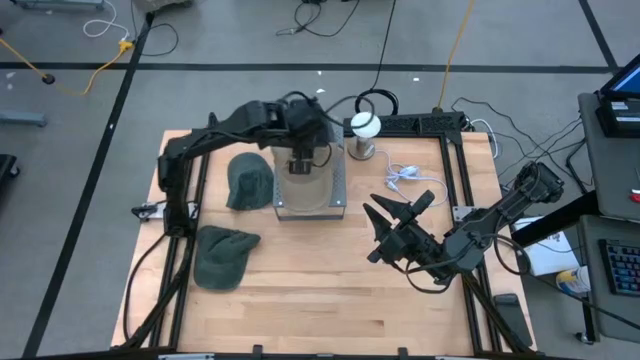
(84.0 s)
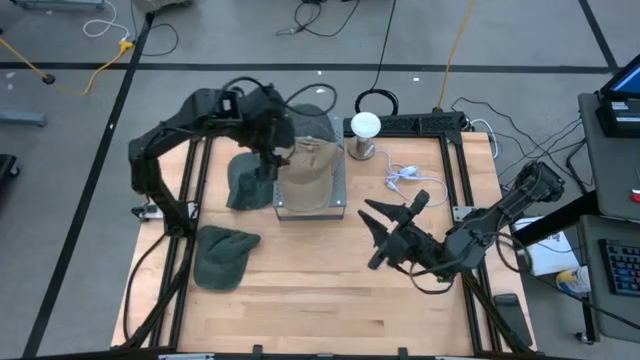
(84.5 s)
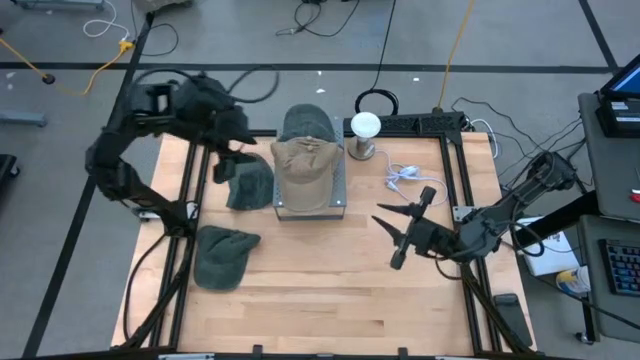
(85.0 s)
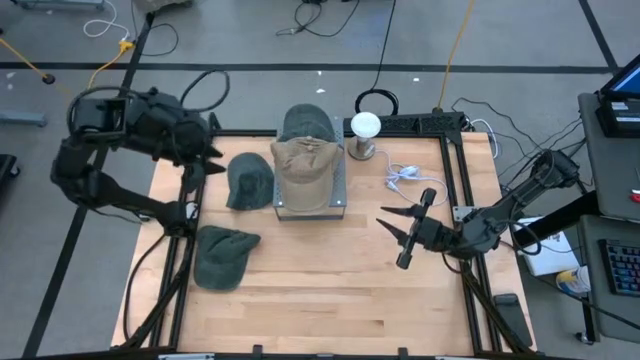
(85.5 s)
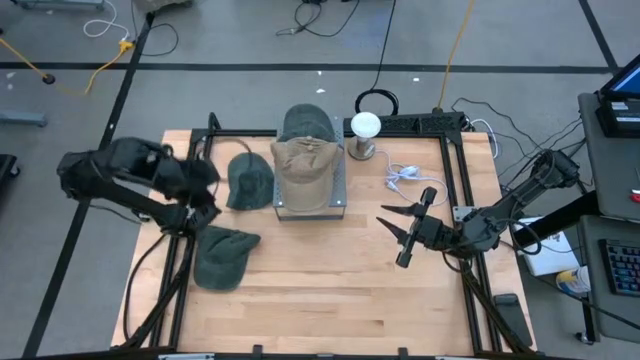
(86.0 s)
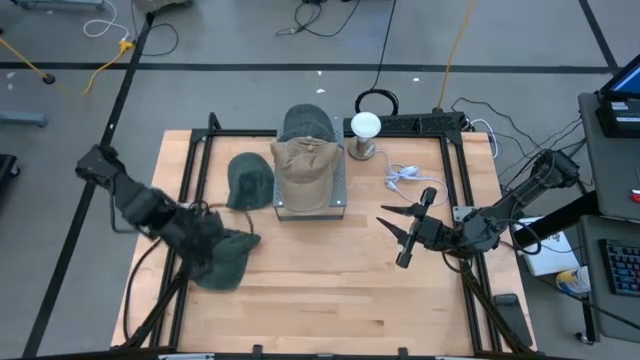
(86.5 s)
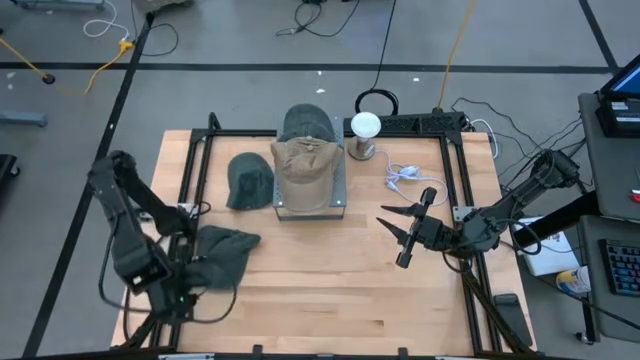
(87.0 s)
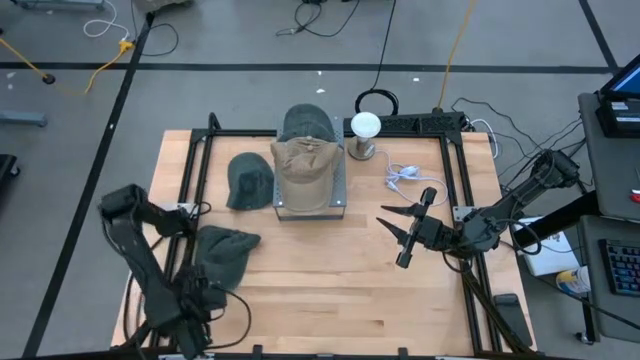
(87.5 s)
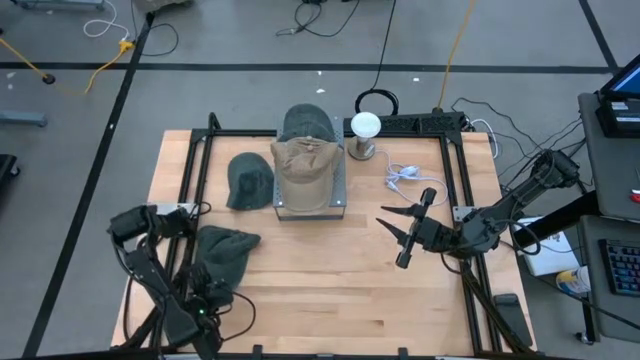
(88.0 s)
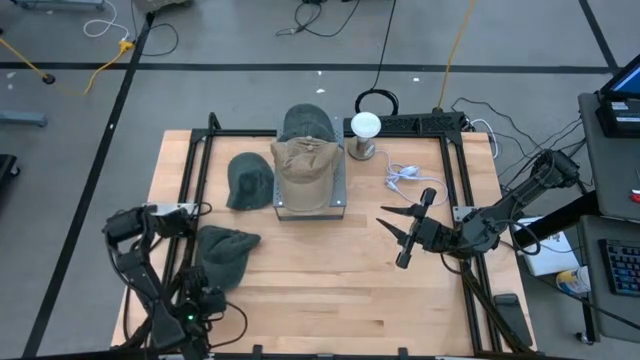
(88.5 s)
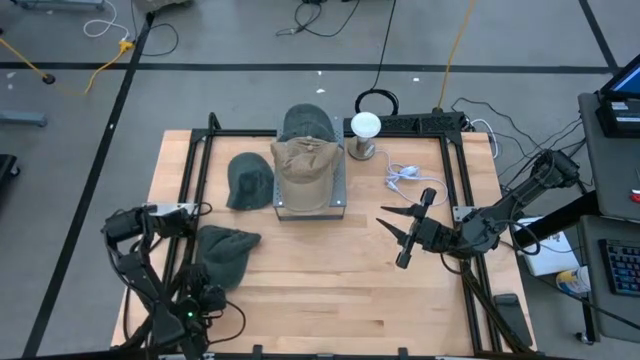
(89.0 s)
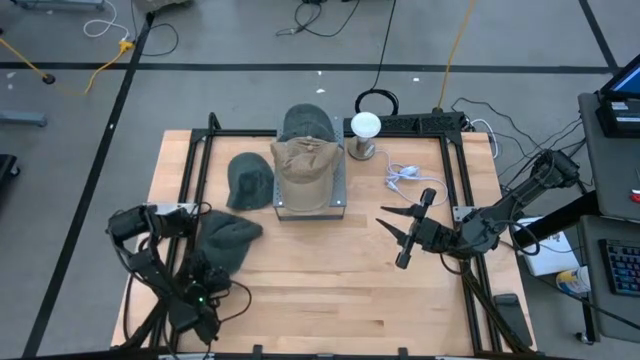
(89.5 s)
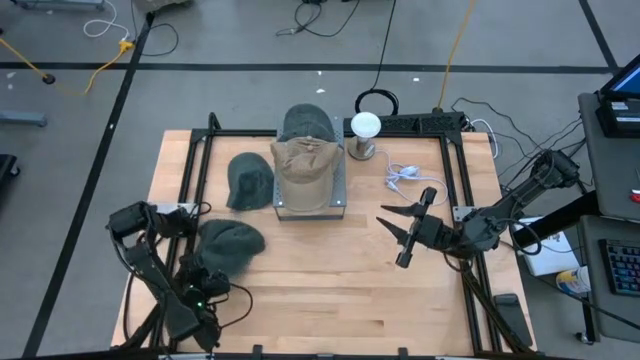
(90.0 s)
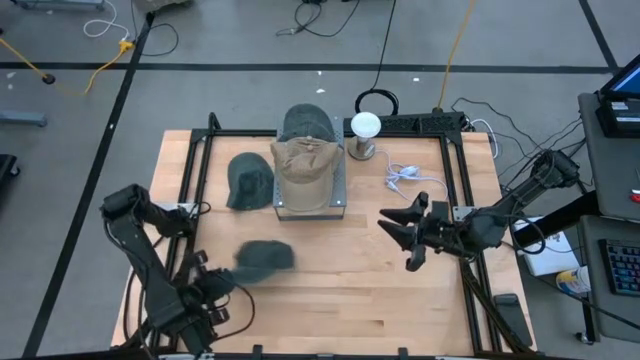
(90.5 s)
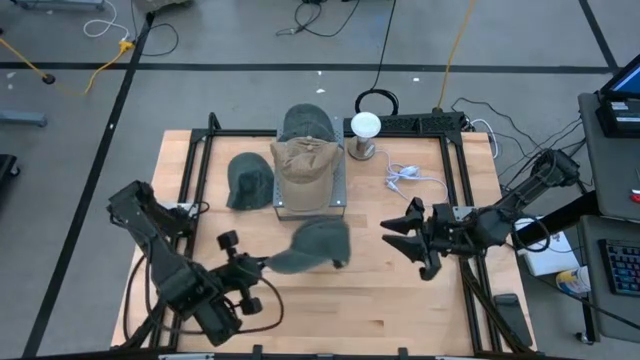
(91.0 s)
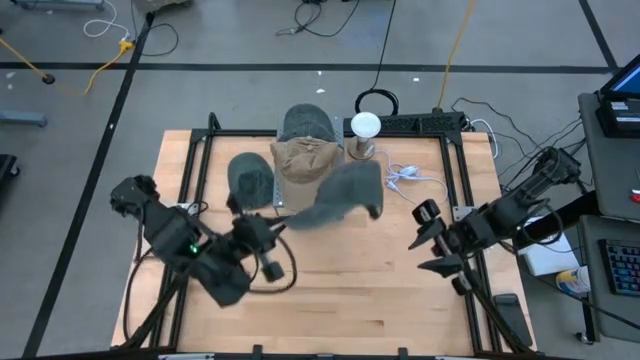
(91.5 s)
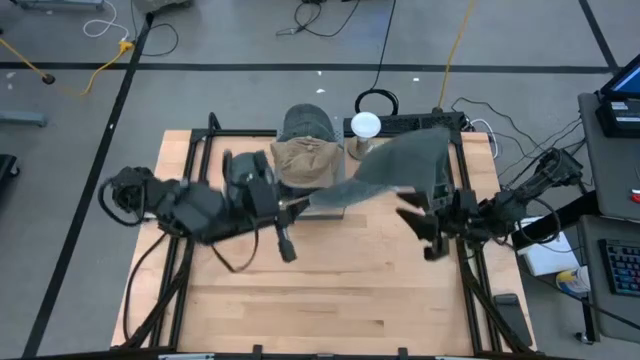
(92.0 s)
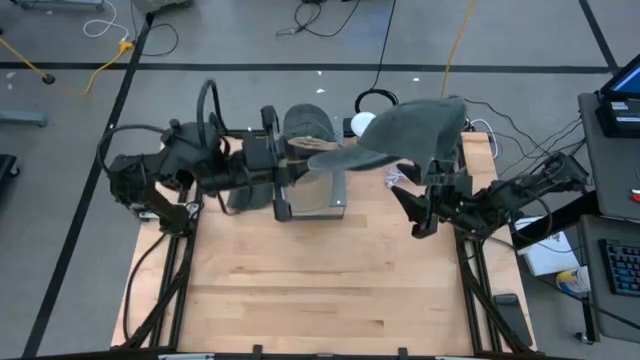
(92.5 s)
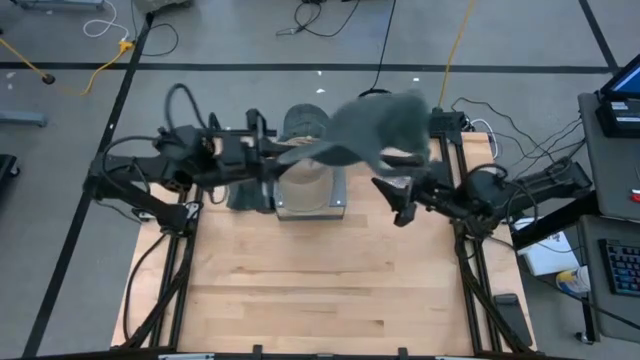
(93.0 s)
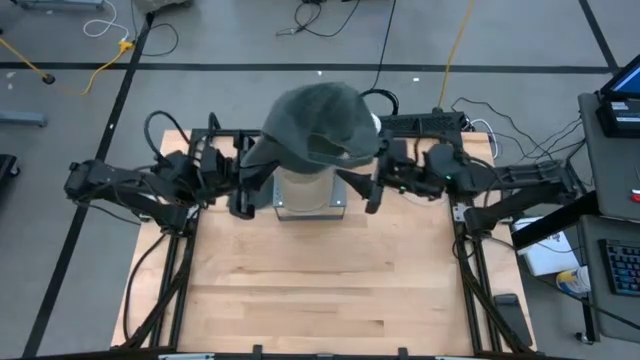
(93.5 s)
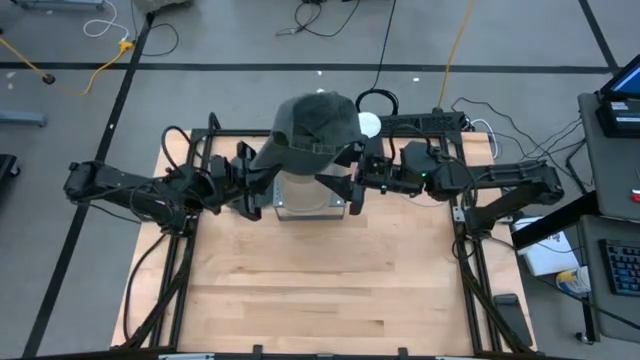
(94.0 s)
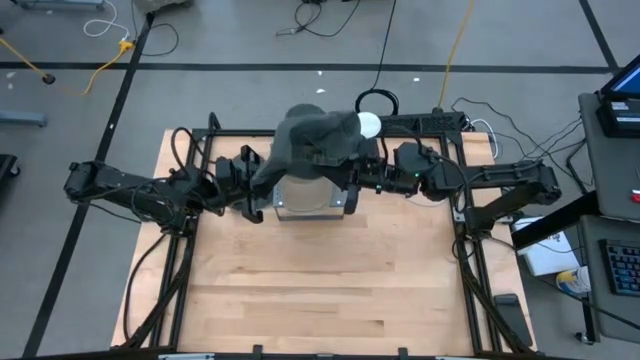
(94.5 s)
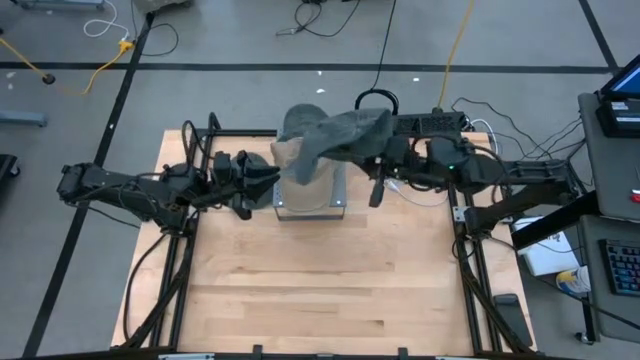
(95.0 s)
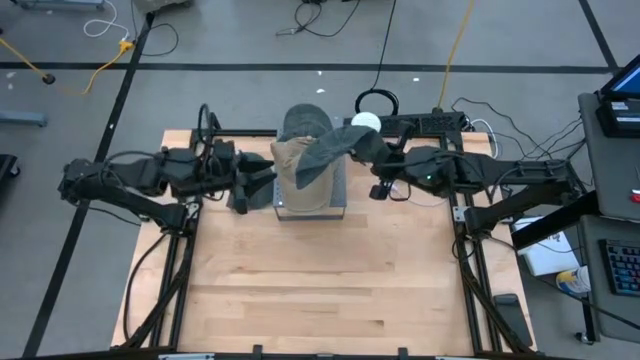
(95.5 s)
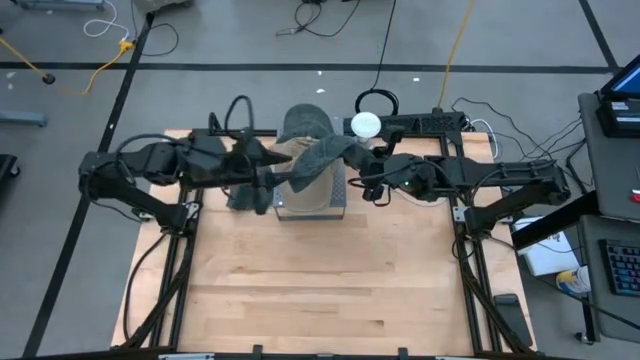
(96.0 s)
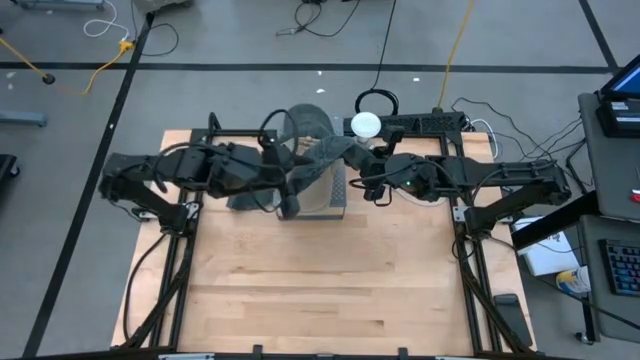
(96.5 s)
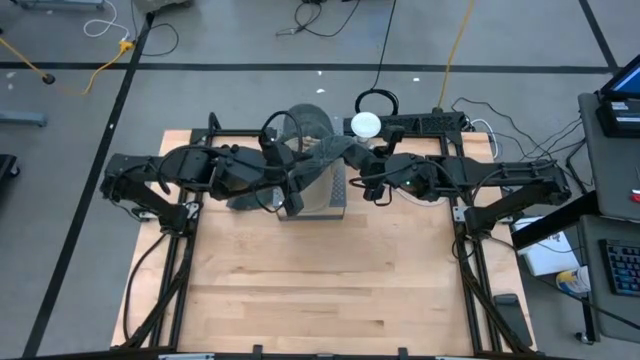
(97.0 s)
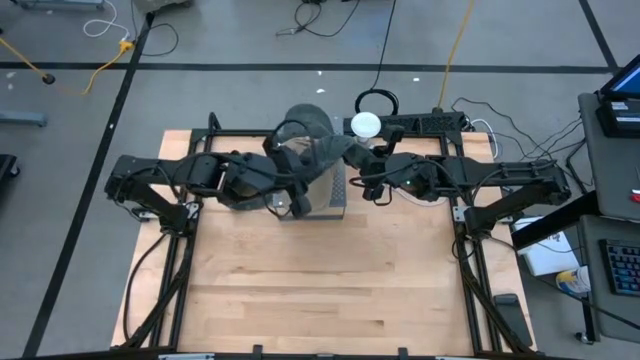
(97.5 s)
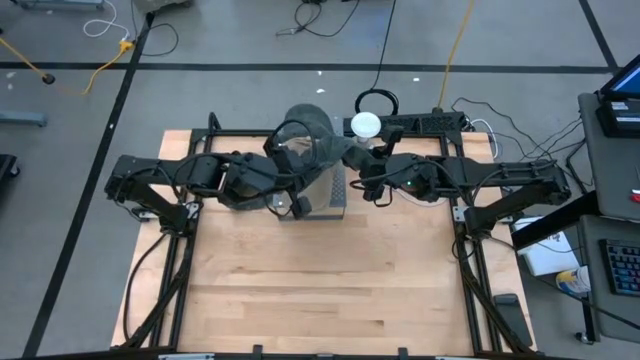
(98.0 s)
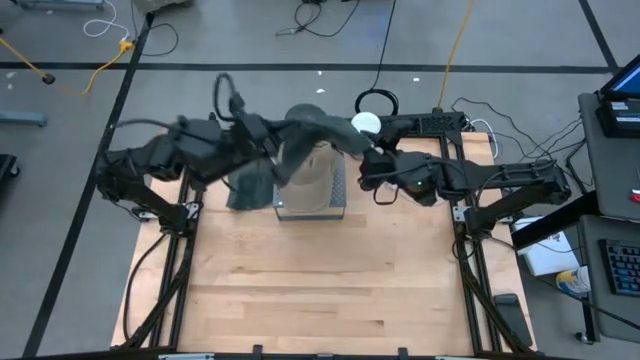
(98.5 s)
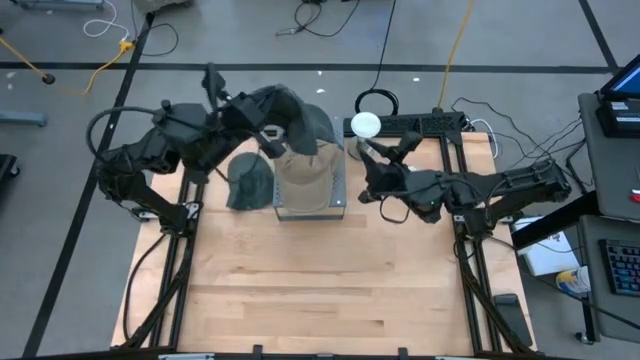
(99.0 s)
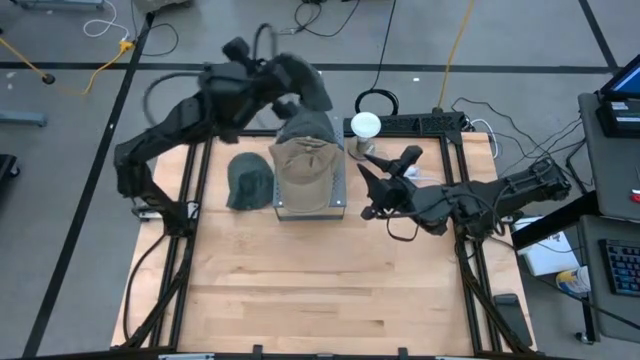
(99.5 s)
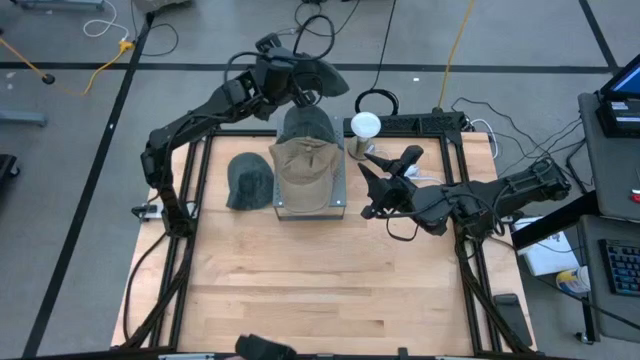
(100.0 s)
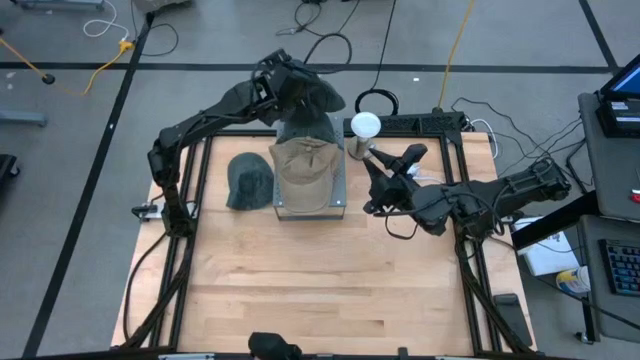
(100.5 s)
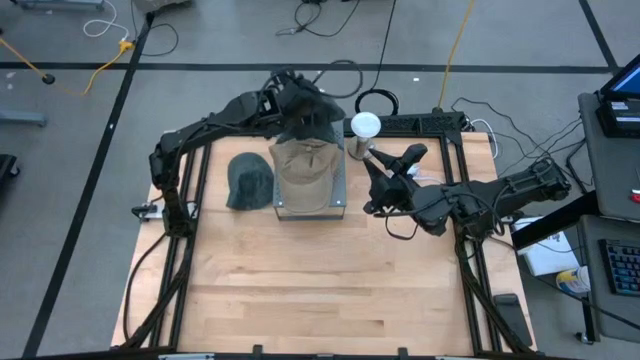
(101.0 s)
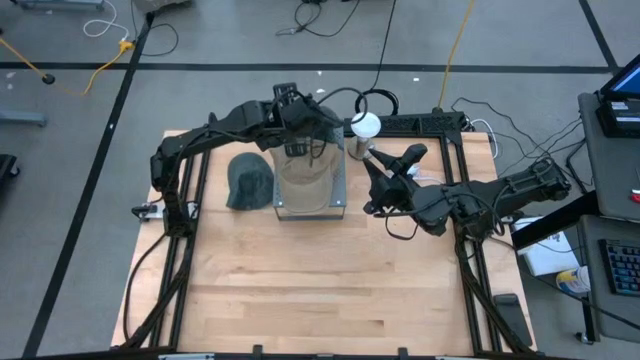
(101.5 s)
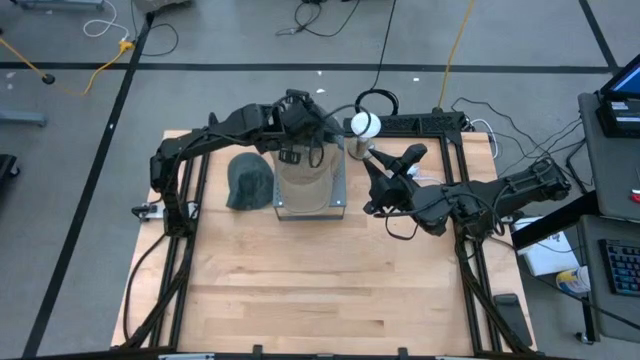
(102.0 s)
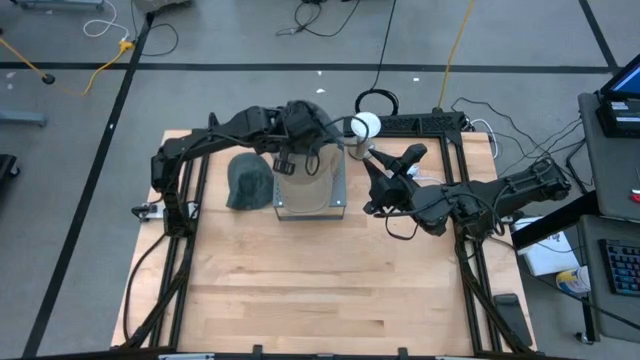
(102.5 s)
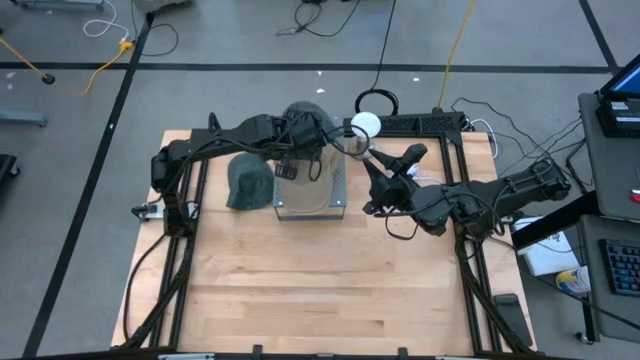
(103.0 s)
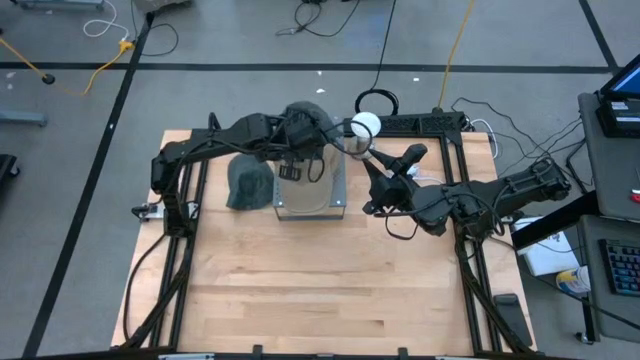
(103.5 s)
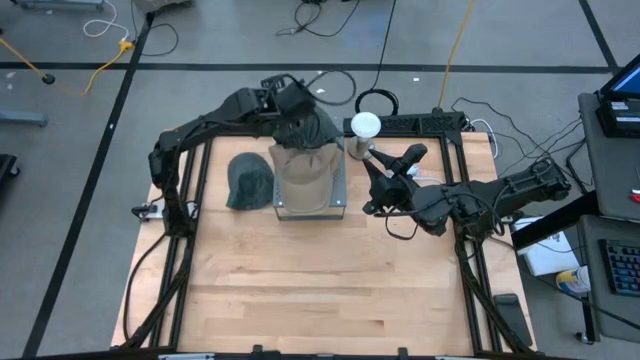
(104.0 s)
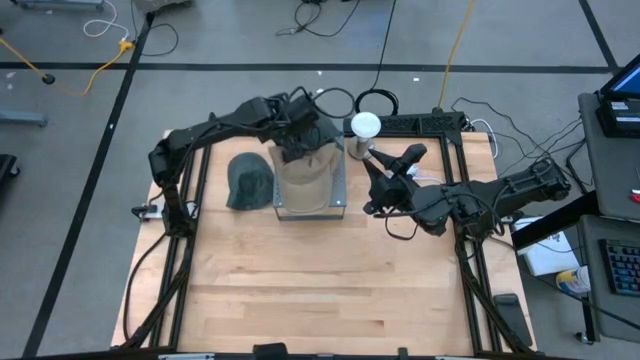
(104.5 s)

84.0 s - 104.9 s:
Task: Pick & Place hat
Stack the bottom black cap on the black cap on the shelf

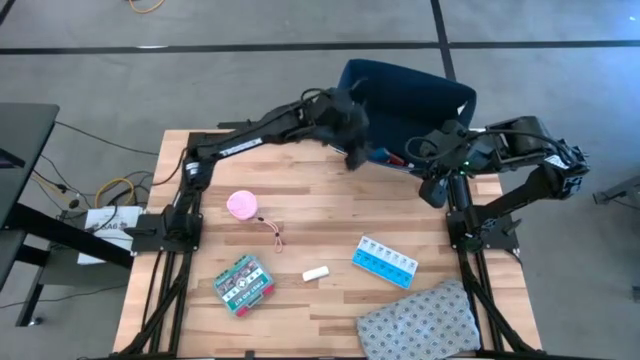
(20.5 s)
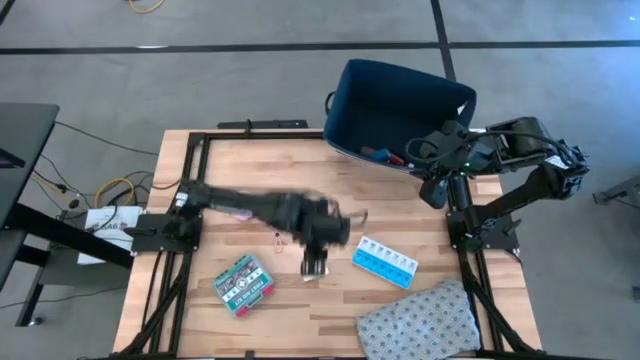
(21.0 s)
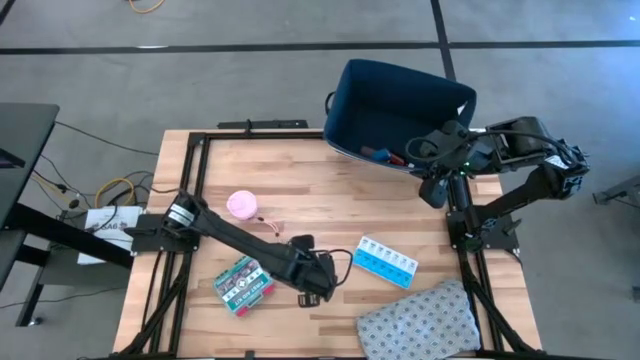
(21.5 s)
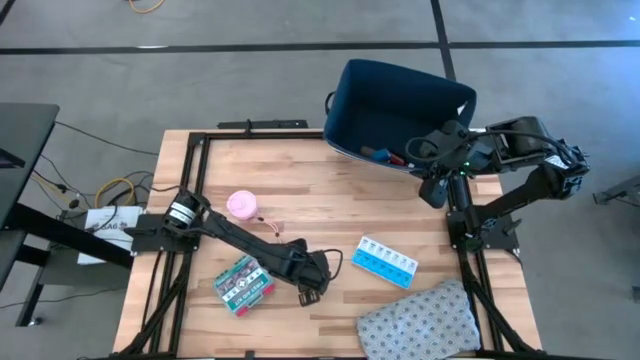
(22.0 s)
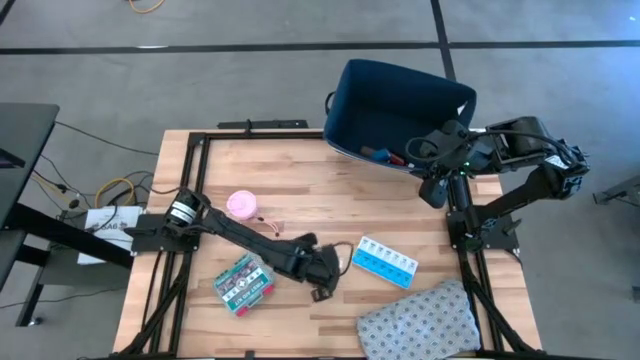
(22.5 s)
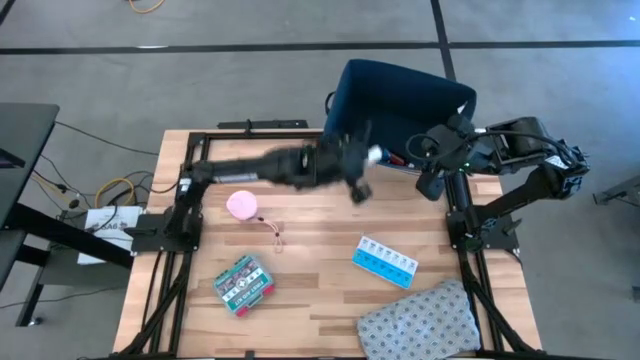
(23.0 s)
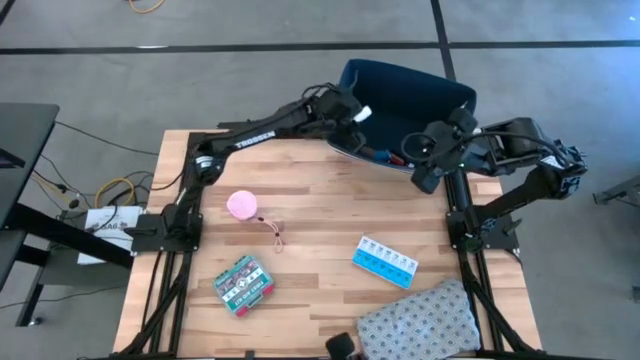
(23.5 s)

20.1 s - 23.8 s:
Task: Pick & place medical supplies in basket/bin
Put the white rolled gauze into the blue bin
